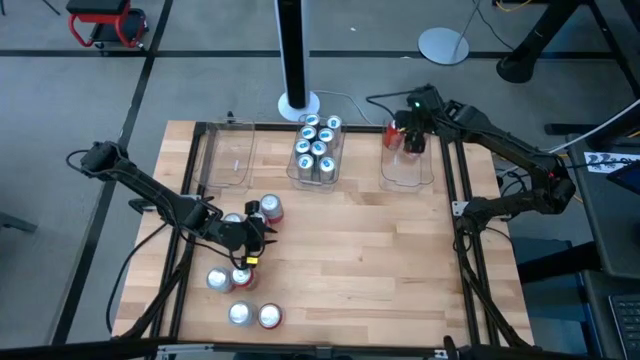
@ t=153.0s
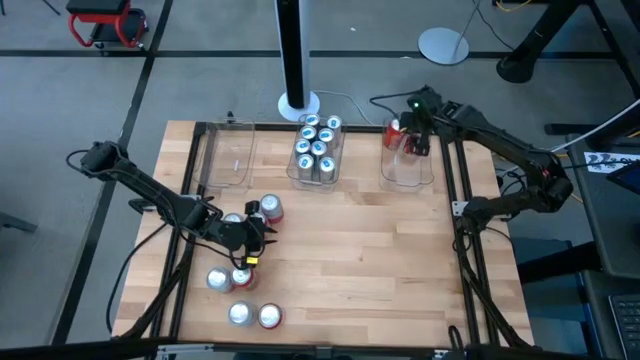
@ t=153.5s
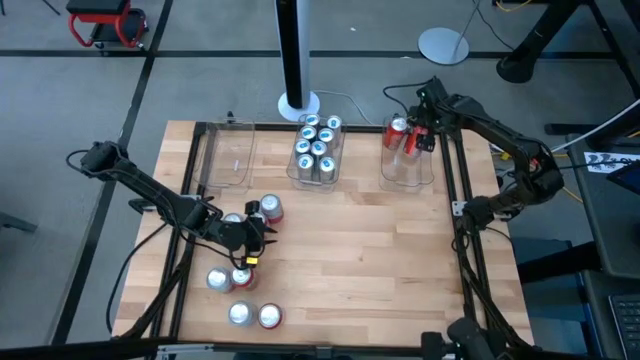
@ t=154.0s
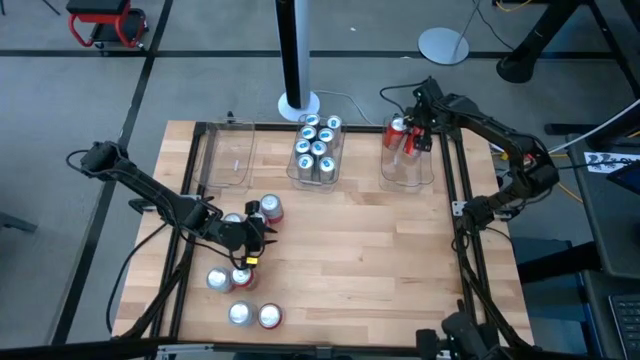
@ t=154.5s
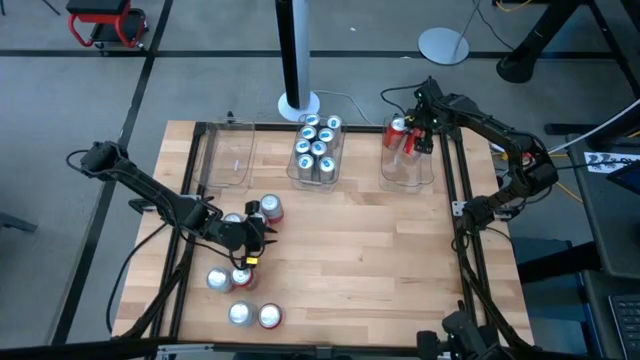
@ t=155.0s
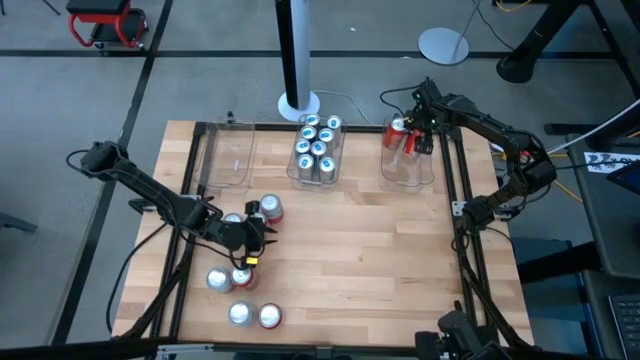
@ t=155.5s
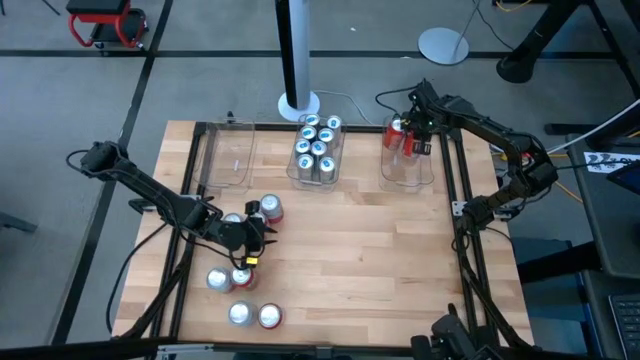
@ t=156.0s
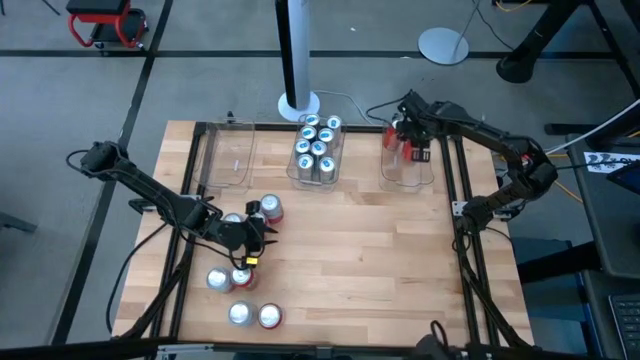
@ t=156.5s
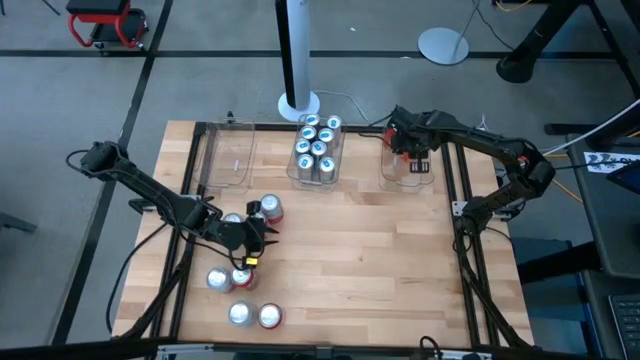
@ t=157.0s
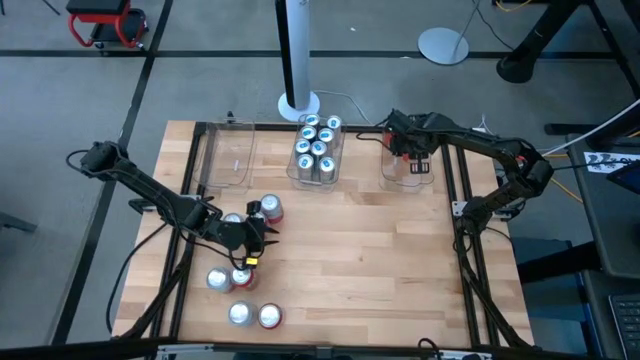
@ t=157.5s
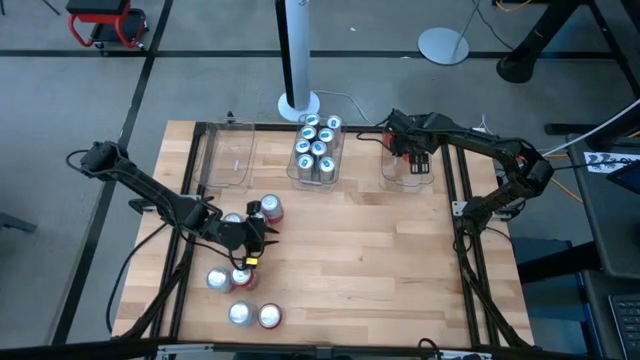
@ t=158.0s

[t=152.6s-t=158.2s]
Task: Sort soda cans
Put the orange soda can into the right transparent bin

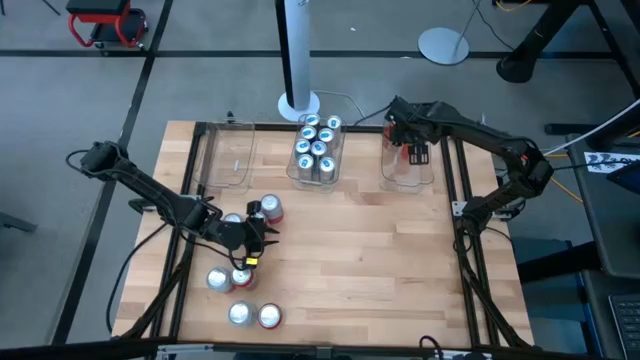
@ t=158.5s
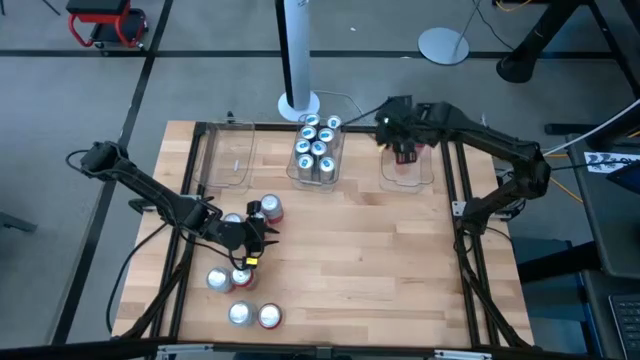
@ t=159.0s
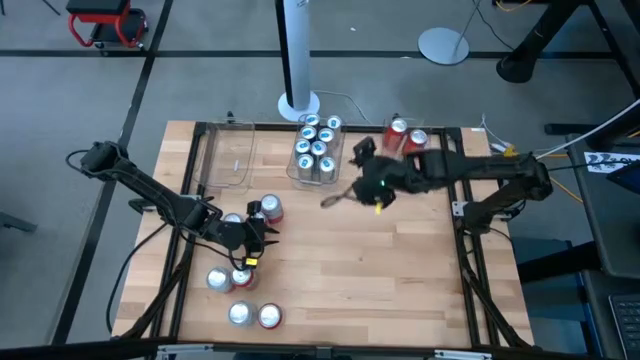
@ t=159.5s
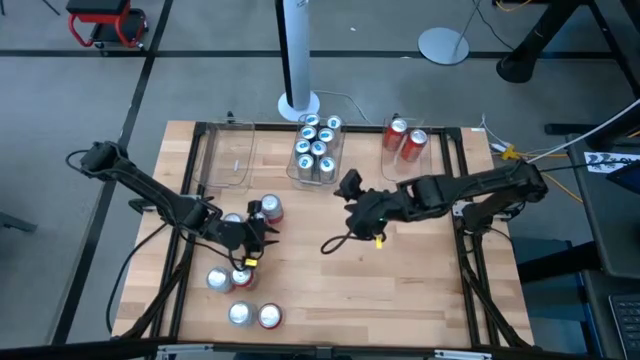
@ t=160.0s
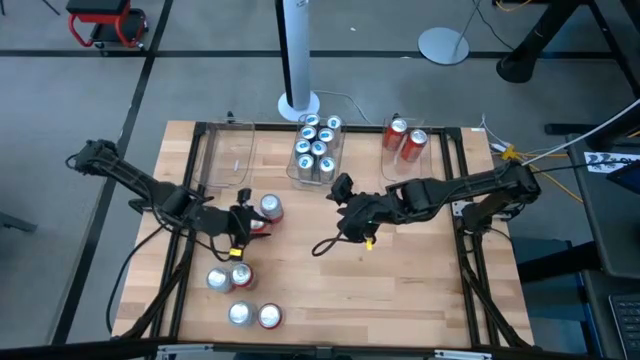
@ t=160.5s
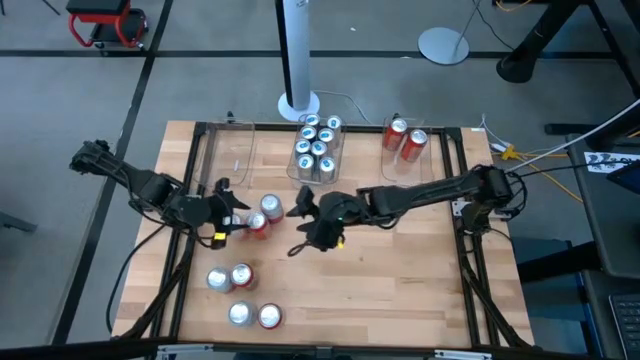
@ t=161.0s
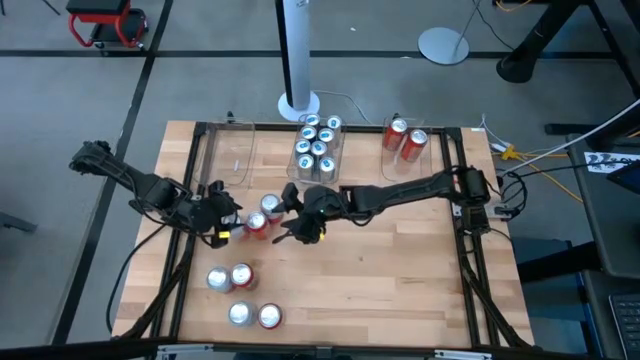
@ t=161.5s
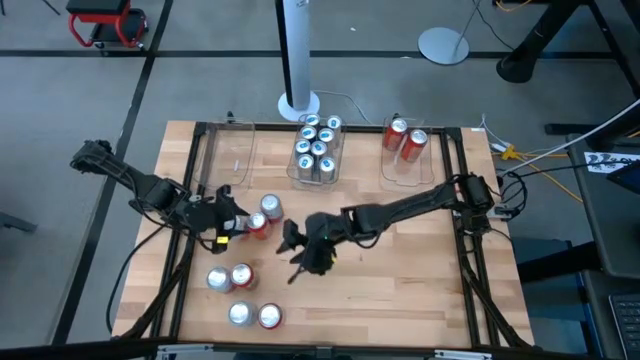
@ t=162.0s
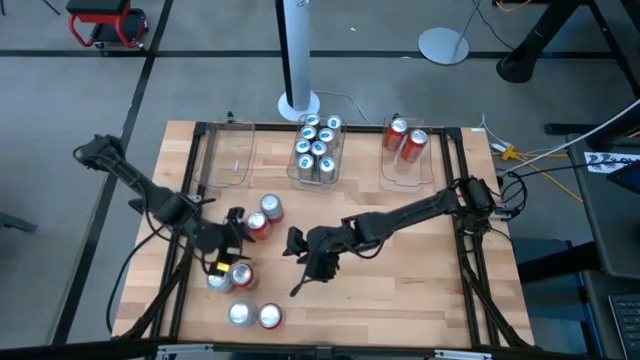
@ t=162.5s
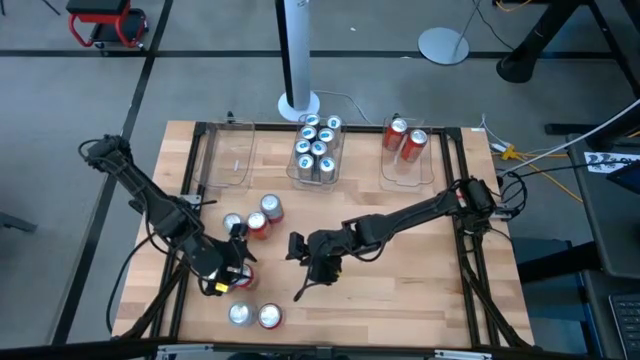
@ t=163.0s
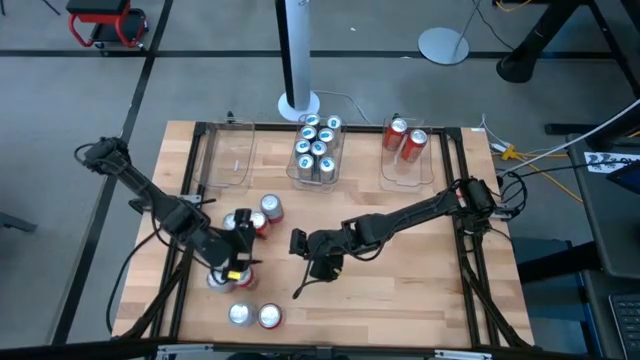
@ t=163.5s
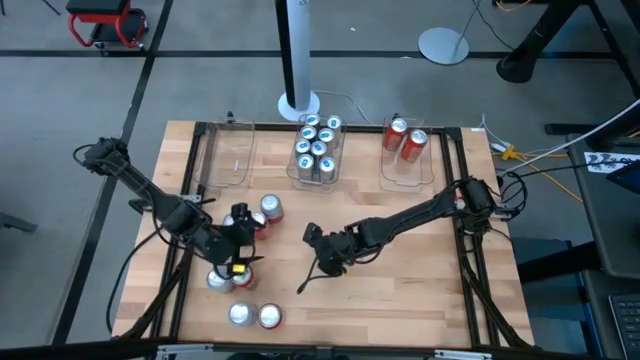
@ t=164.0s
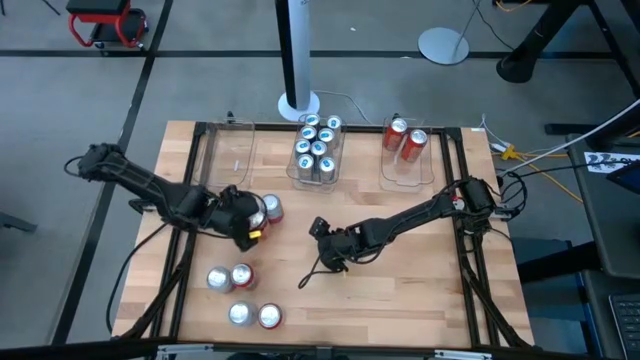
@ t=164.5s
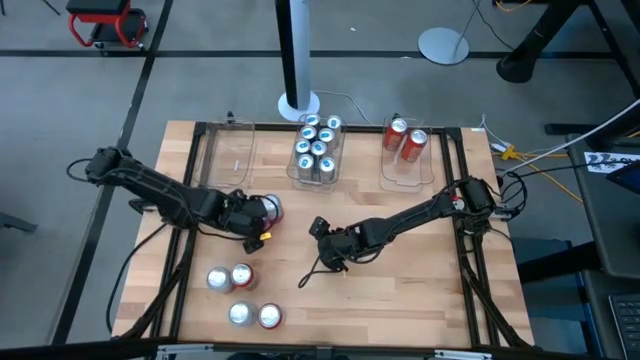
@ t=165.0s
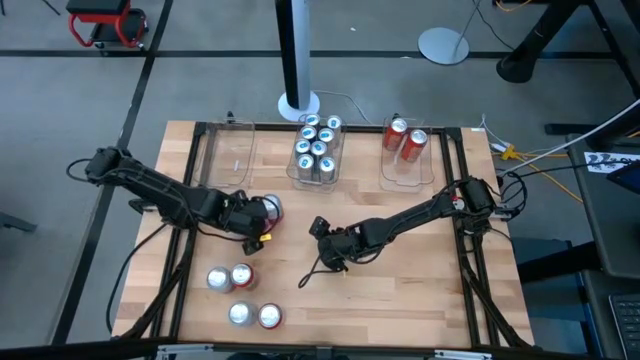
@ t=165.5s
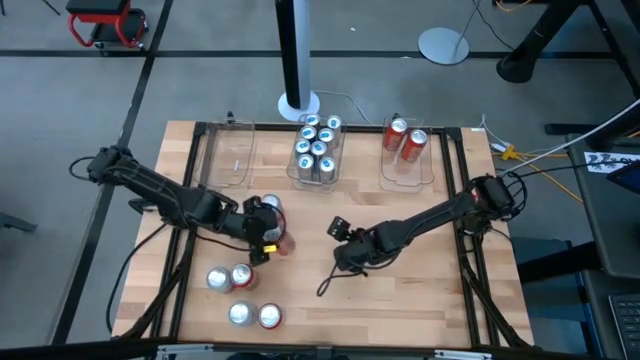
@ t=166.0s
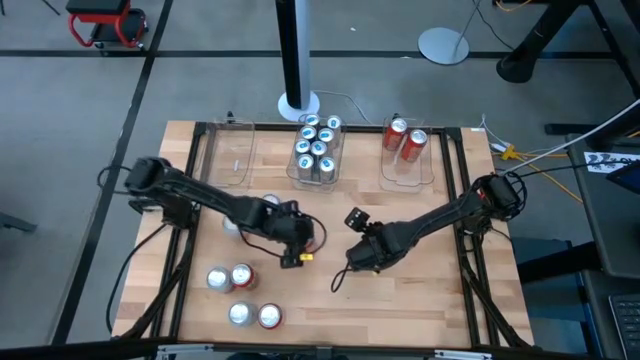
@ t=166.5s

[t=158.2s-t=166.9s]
Put the orange soda can into the right transparent bin

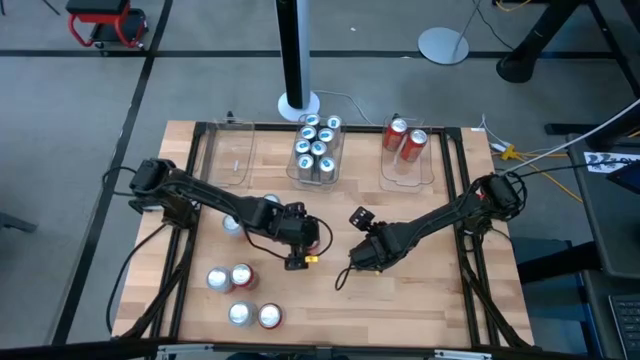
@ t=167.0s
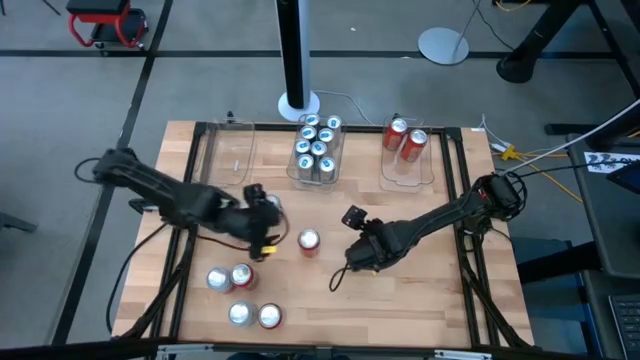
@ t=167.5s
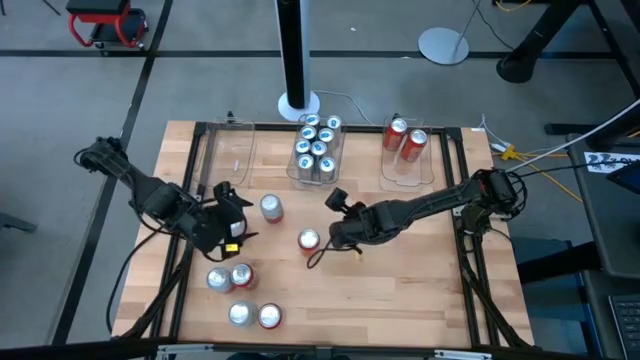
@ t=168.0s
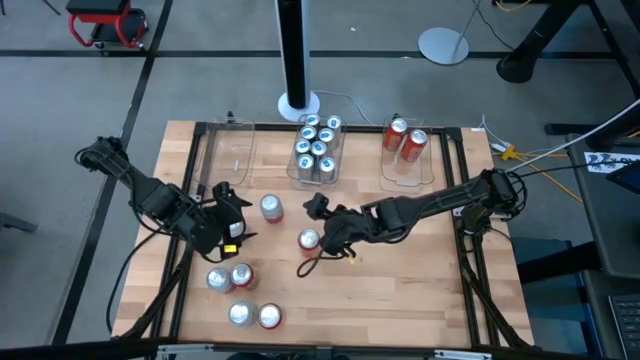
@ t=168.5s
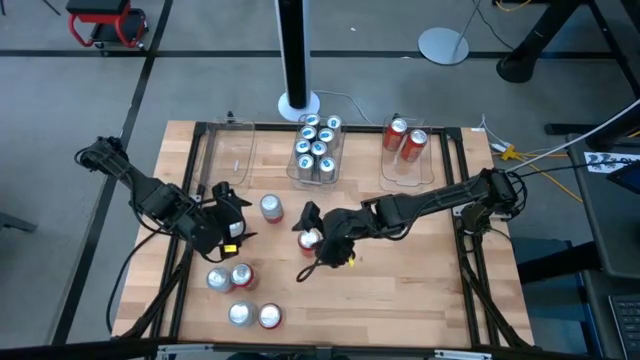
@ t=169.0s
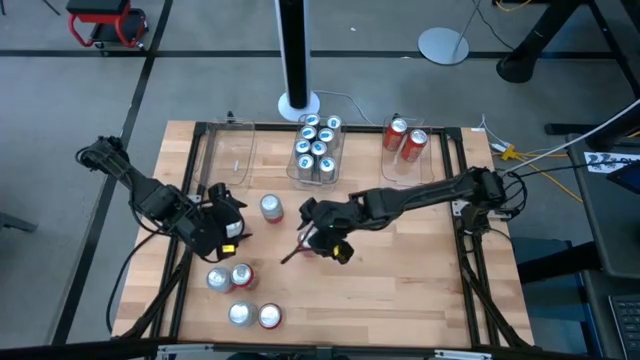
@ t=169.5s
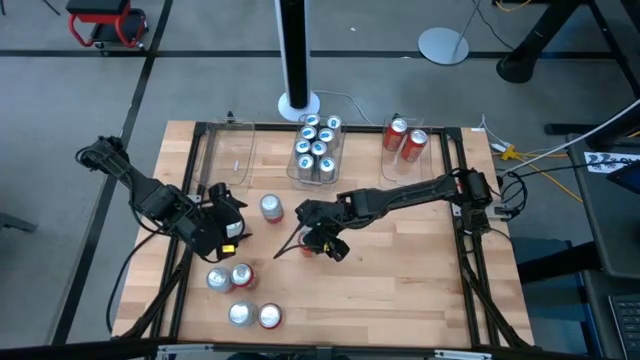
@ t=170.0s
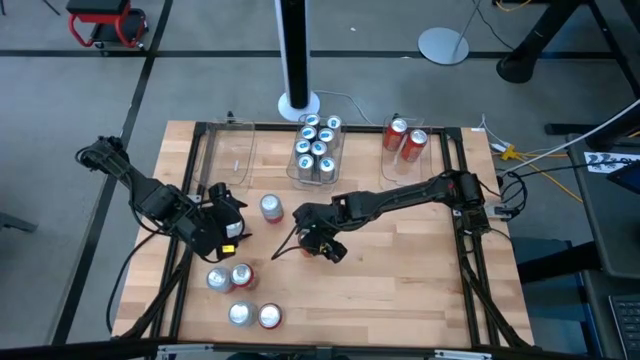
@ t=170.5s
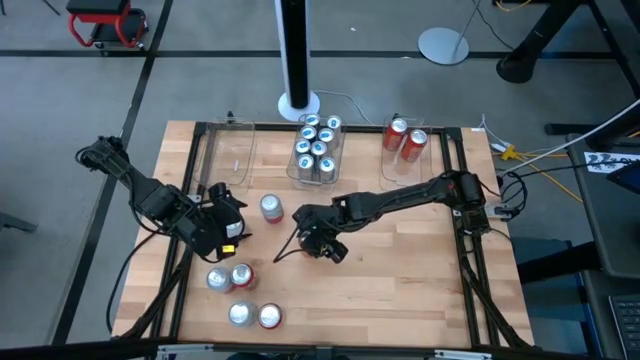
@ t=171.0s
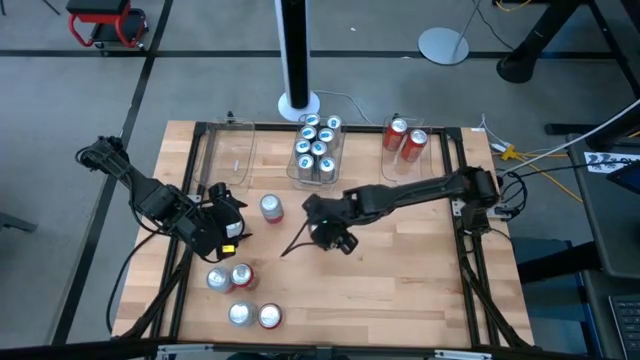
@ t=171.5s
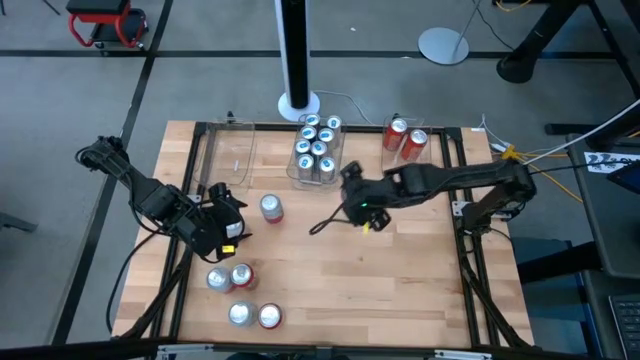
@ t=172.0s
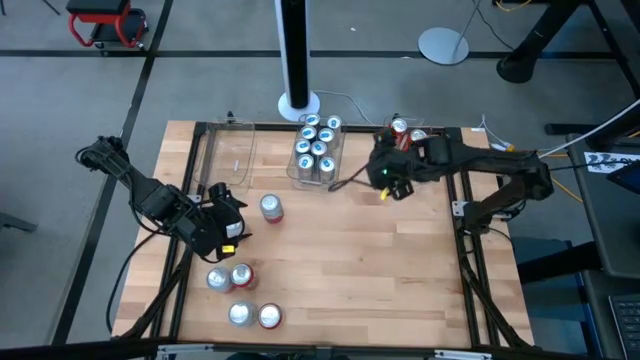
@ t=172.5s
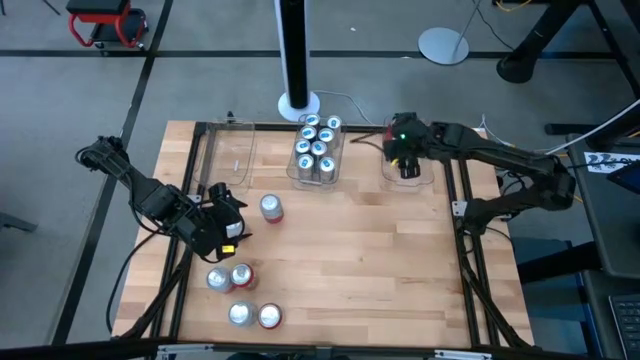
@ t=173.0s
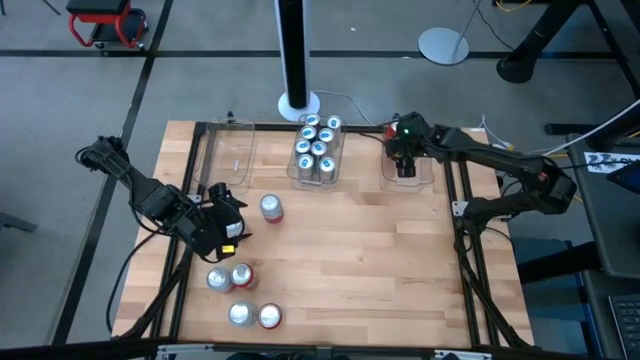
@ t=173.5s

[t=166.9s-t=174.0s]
Put the orange soda can into the right transparent bin
